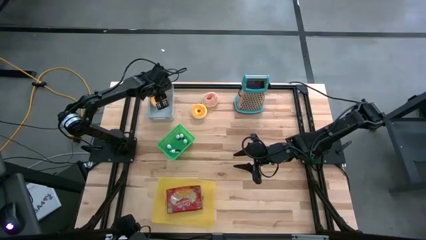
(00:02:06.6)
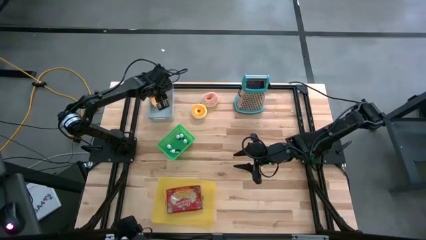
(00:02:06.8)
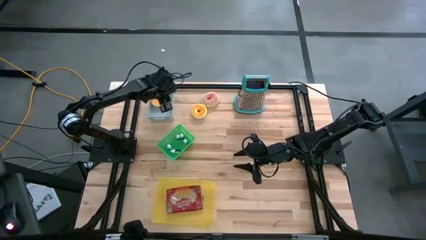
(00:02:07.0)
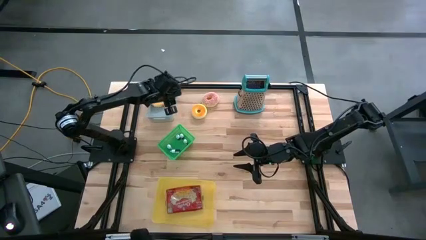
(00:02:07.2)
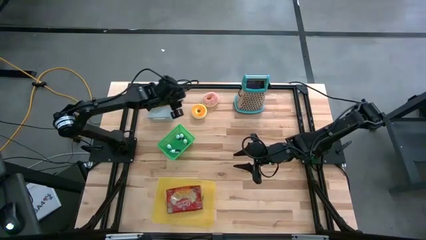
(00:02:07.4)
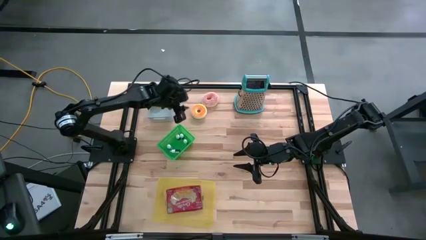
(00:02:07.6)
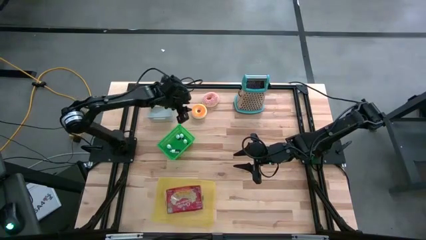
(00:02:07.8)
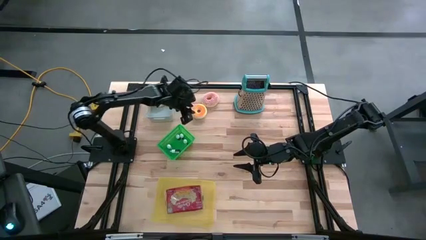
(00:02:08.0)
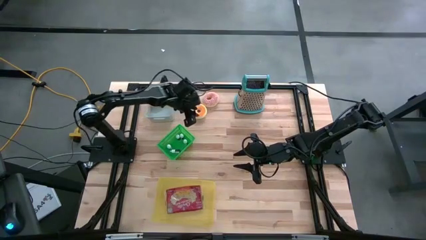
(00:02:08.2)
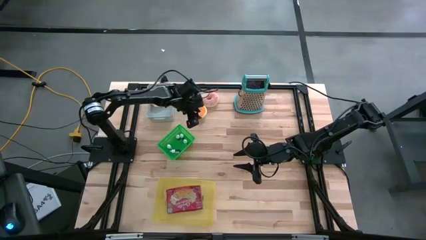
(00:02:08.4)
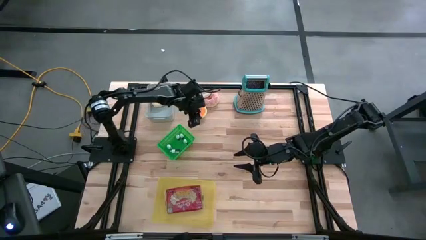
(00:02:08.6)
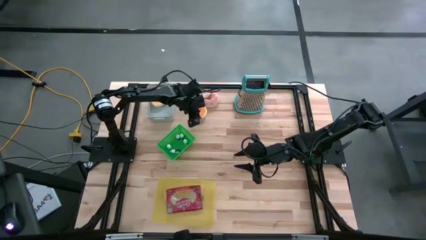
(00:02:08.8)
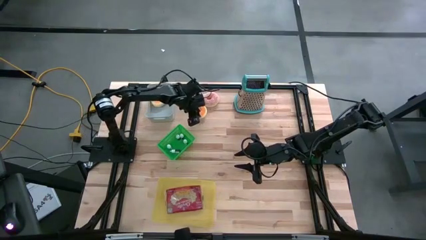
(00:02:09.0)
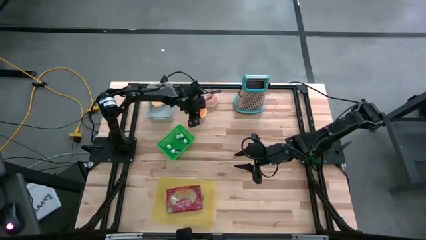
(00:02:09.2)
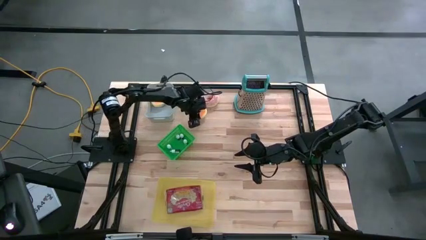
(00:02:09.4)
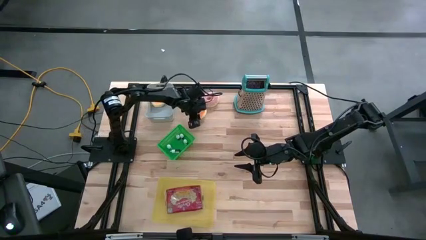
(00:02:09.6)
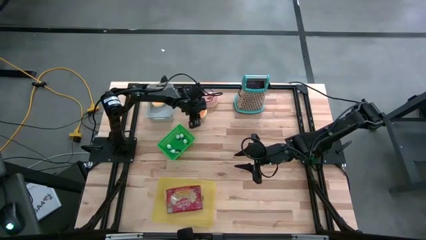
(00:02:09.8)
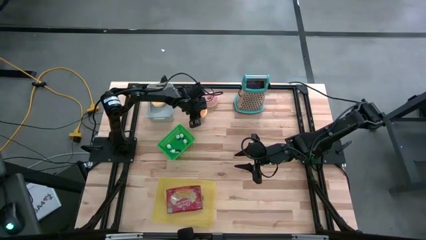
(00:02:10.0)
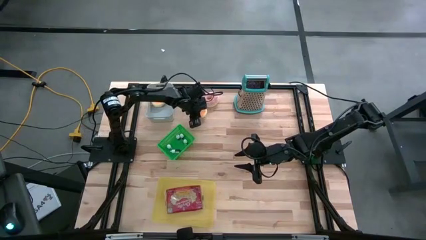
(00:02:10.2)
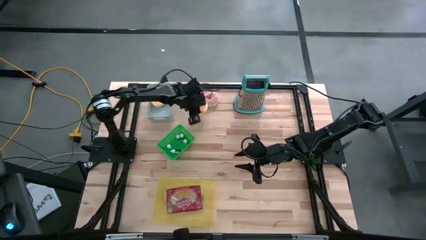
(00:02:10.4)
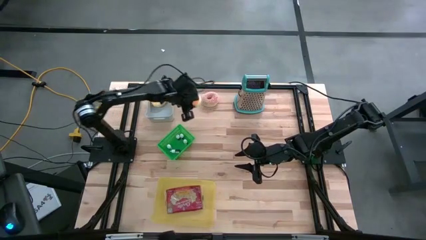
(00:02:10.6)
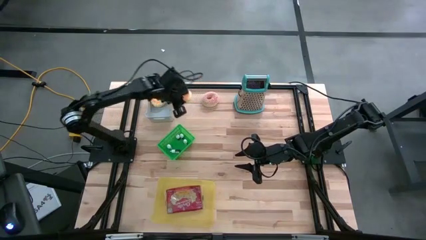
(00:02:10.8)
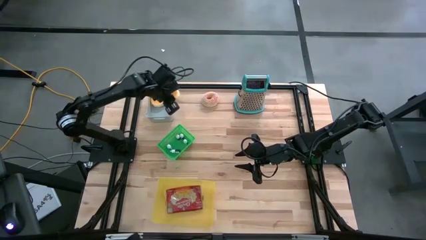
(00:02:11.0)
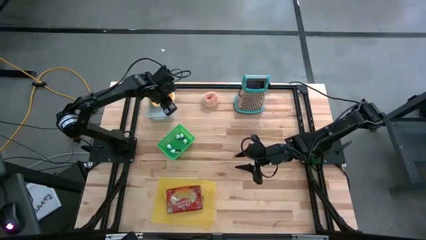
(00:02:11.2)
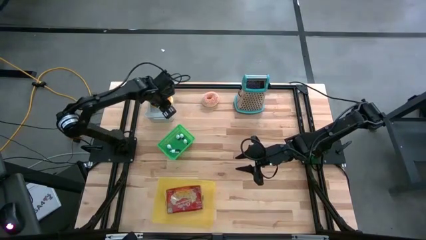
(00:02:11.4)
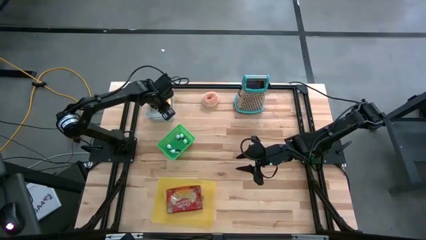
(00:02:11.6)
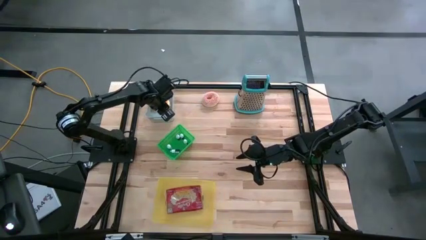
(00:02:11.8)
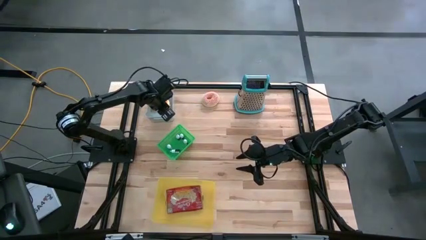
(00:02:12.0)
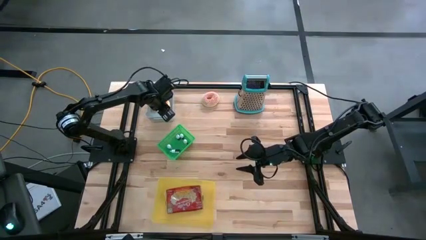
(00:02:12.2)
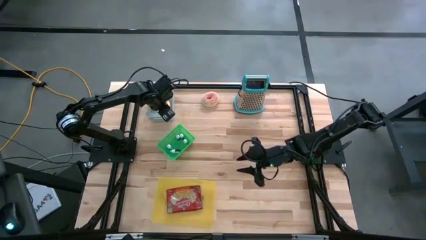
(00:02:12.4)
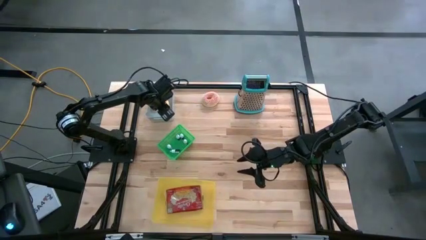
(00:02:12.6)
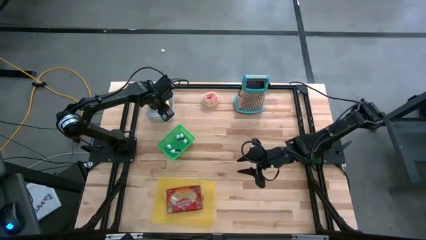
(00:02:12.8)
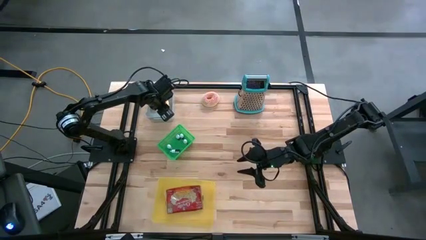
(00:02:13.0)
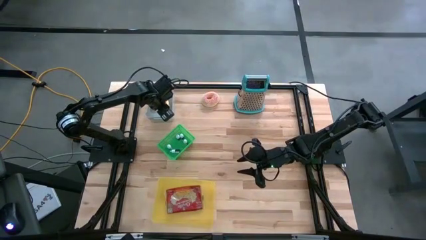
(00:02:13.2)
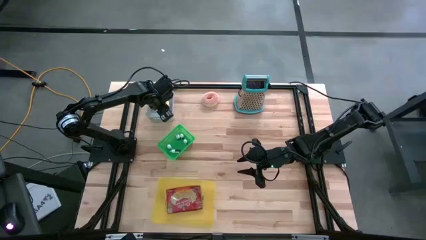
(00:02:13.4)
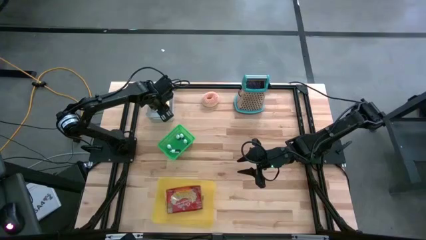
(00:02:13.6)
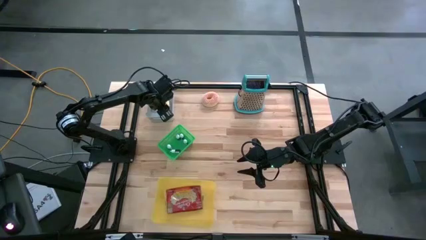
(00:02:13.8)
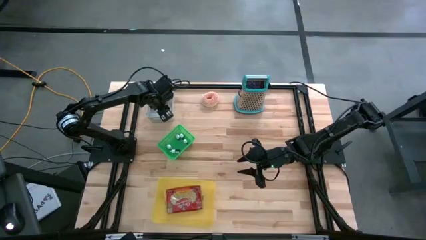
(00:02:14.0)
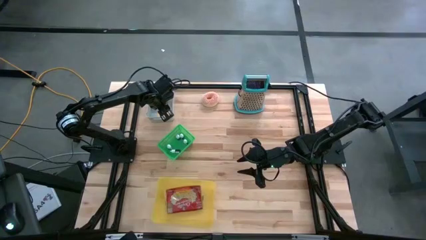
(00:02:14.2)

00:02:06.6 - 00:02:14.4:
Put the yellow donut into the gray bin

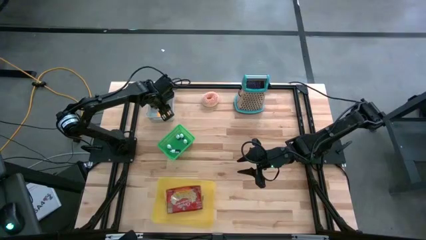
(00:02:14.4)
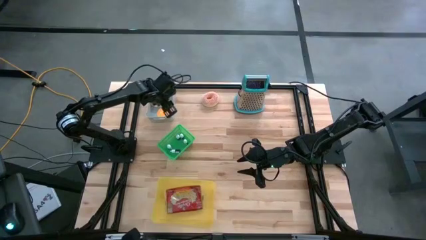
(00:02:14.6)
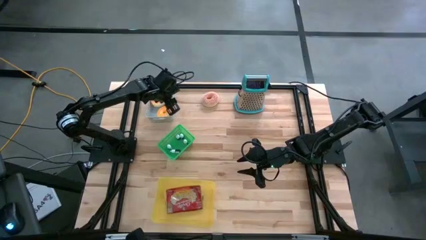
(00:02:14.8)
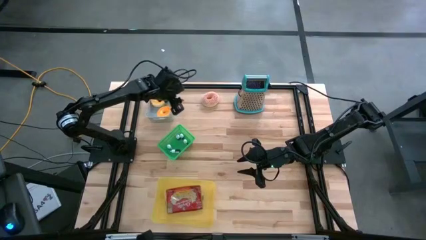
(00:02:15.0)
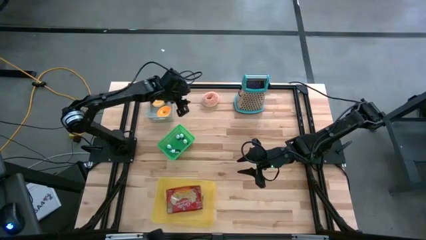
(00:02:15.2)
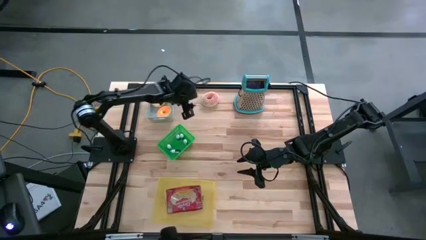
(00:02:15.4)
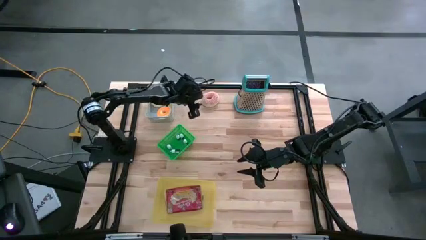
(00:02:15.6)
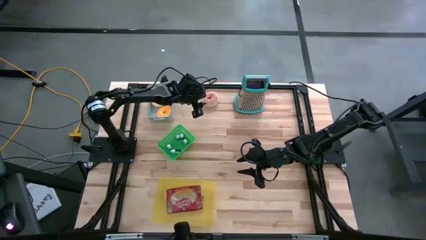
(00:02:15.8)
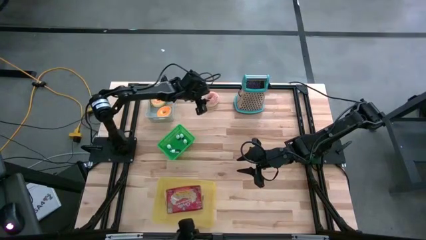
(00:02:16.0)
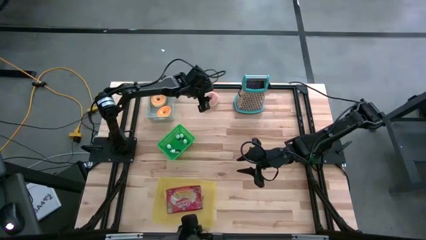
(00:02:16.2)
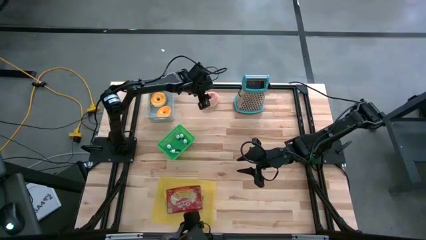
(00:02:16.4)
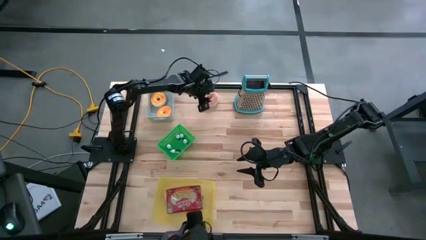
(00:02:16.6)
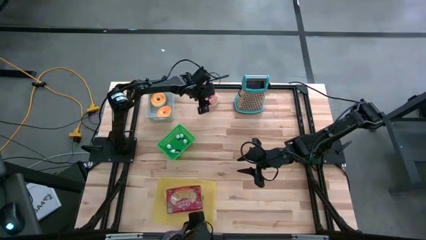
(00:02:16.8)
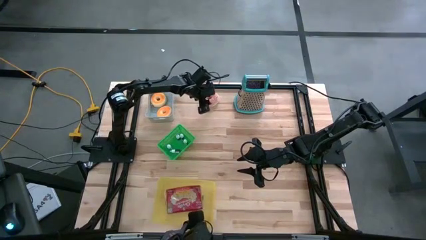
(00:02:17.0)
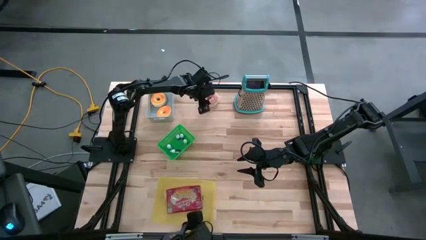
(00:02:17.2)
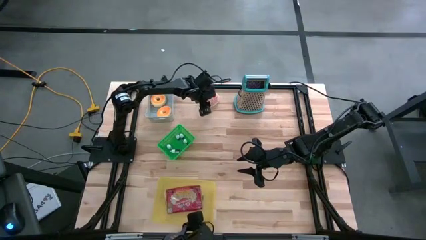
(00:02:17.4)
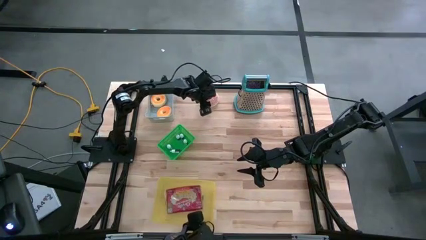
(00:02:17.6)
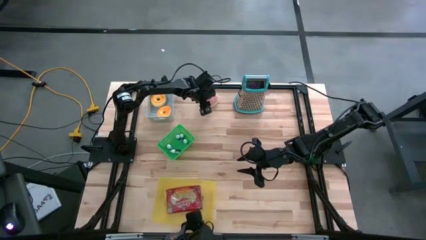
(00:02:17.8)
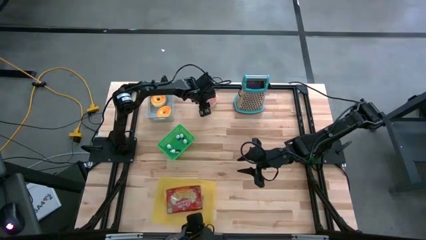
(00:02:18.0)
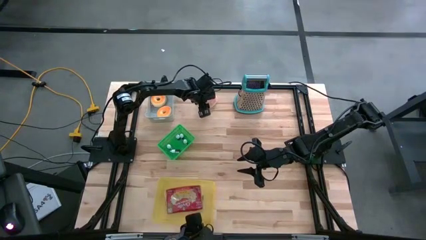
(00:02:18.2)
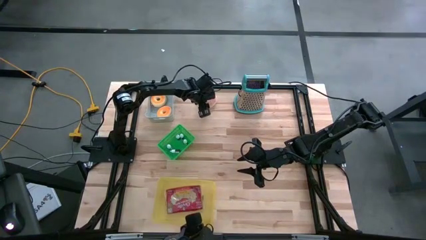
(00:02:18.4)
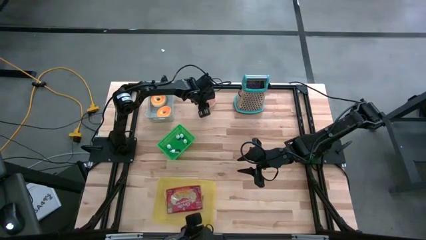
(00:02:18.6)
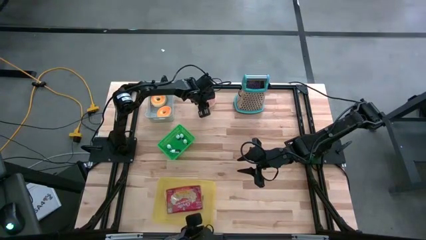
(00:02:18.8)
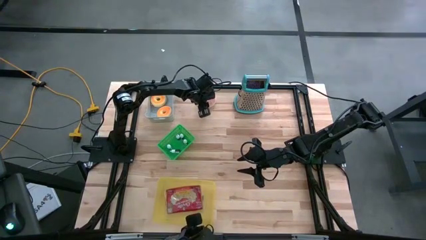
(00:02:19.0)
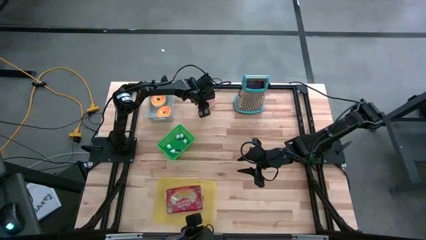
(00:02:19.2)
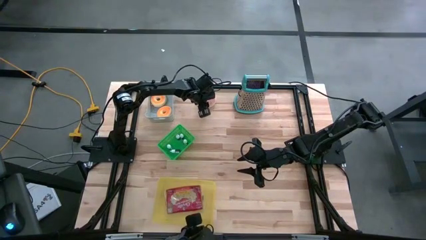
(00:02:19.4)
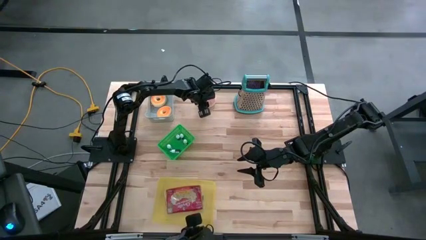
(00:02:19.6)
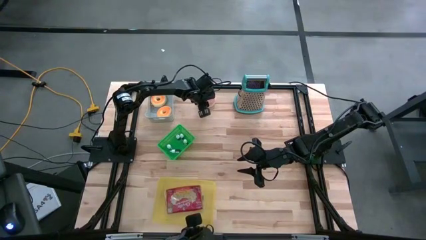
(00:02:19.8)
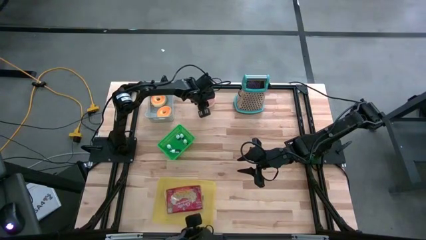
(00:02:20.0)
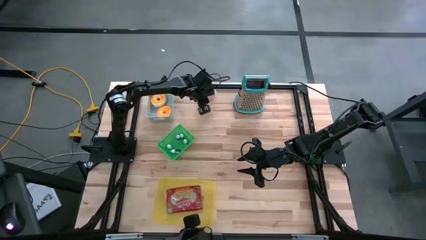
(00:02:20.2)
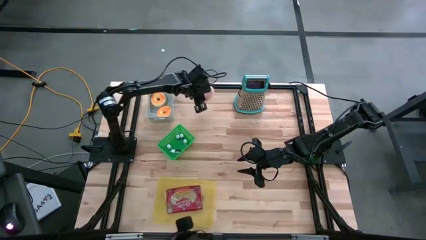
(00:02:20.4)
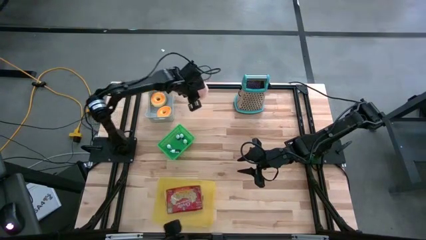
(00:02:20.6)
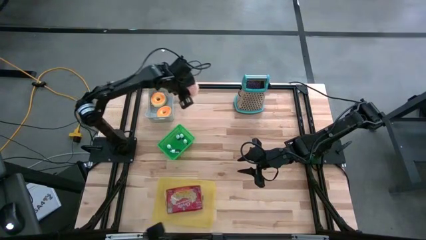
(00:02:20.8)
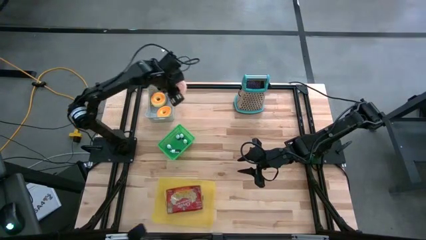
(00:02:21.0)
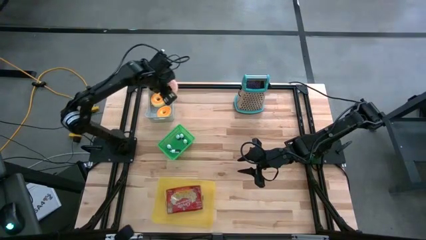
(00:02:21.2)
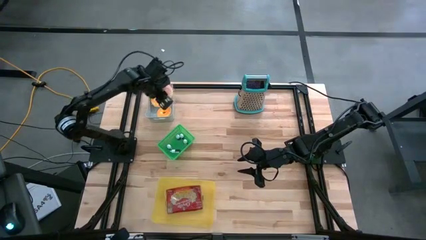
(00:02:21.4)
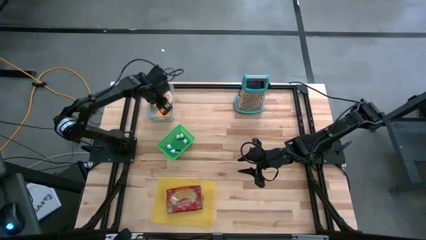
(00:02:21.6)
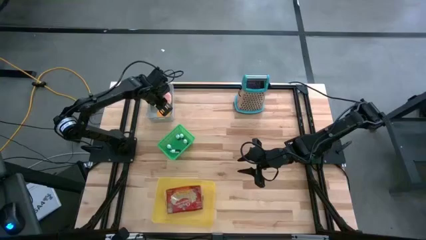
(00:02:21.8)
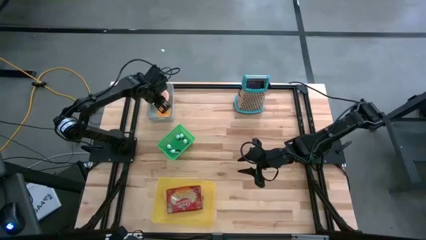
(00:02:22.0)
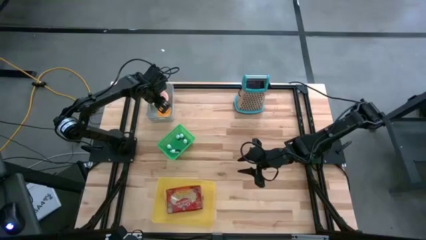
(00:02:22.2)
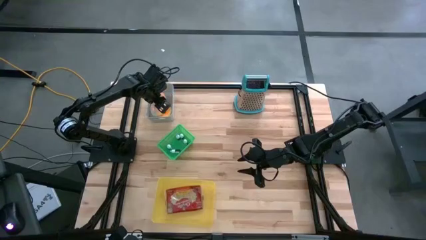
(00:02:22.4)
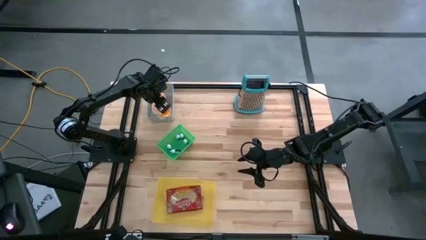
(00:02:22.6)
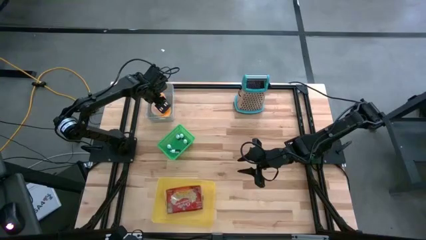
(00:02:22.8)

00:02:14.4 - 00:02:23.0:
Put the pink and brown donut into the gray bin
